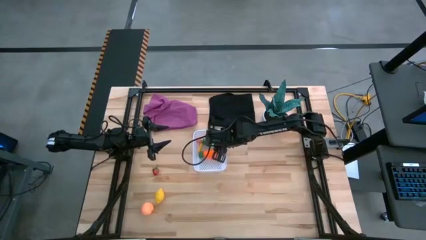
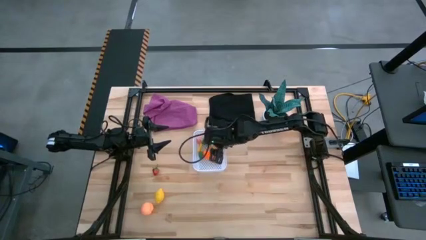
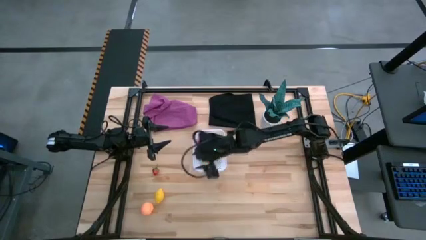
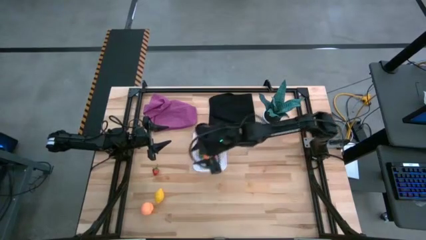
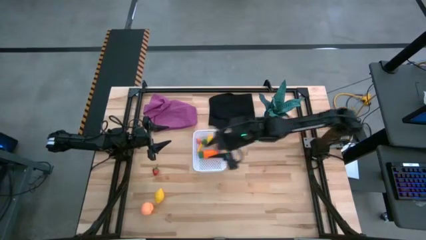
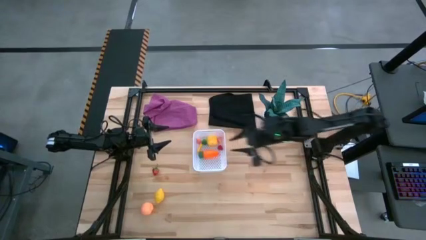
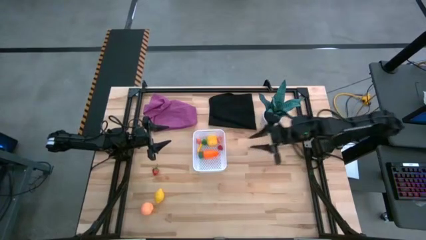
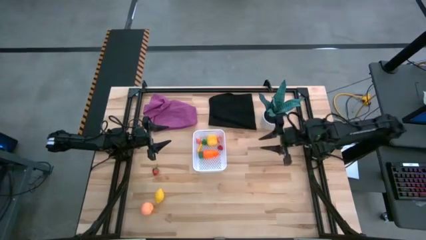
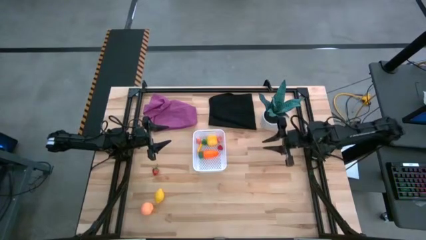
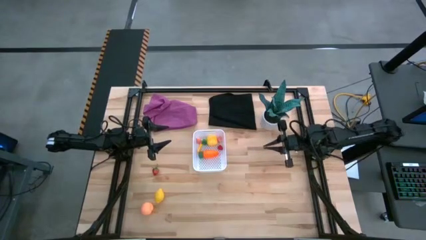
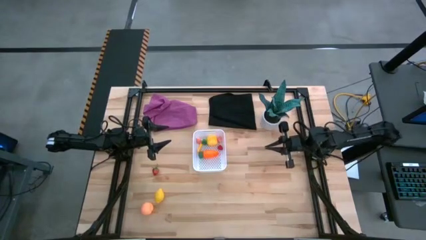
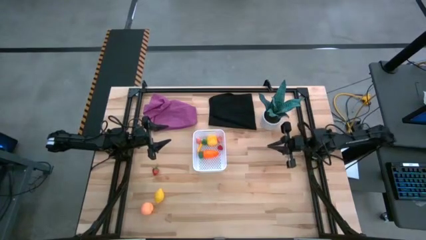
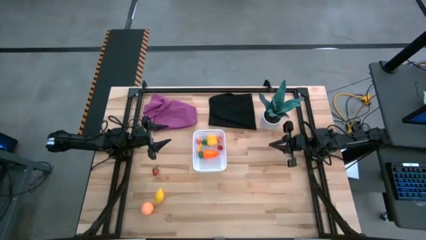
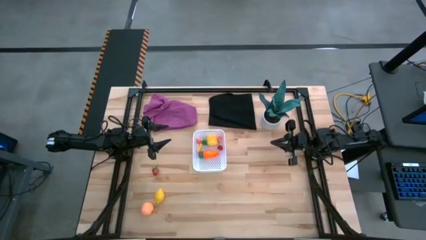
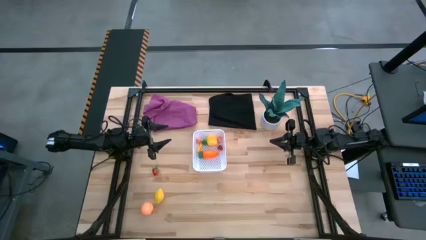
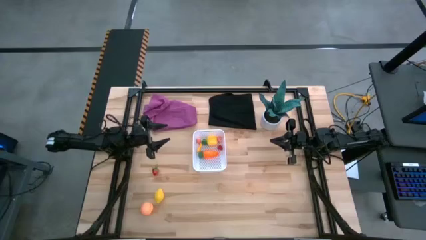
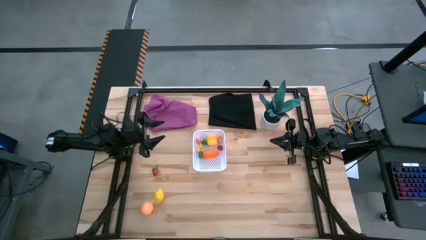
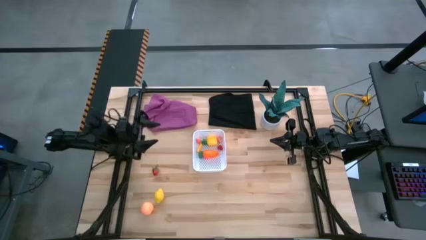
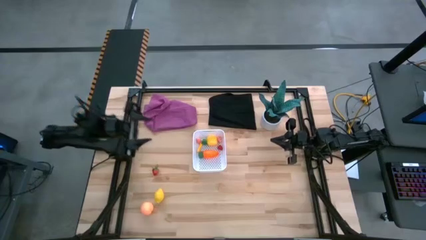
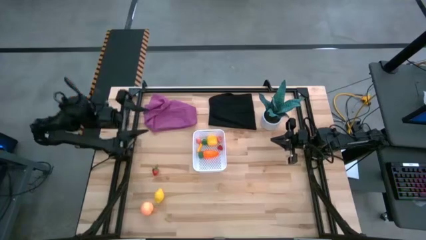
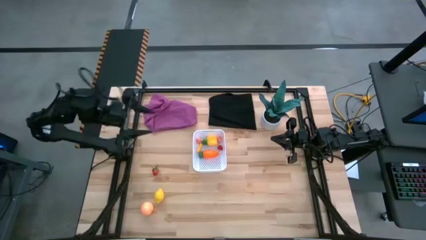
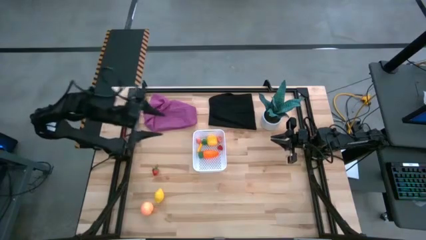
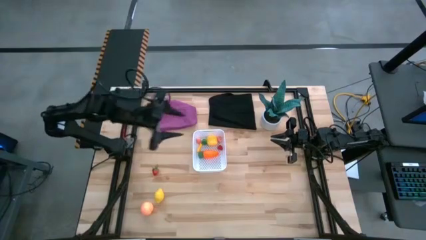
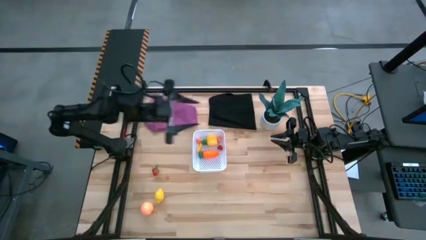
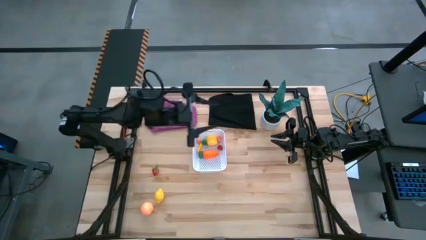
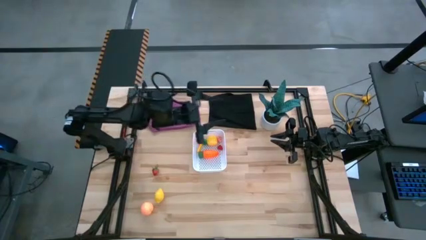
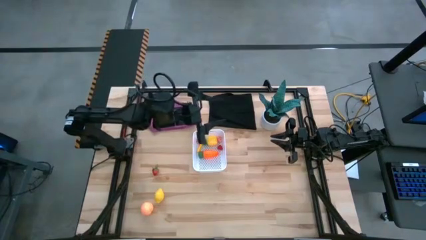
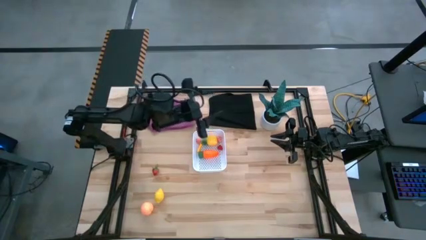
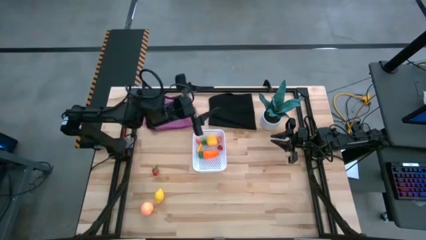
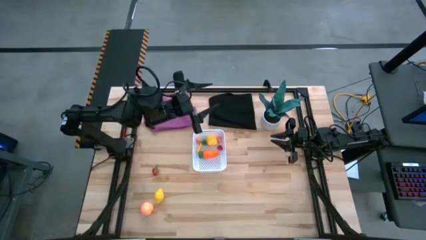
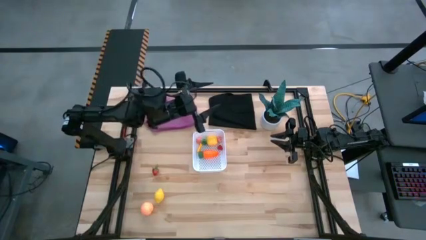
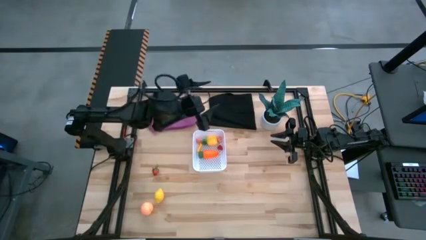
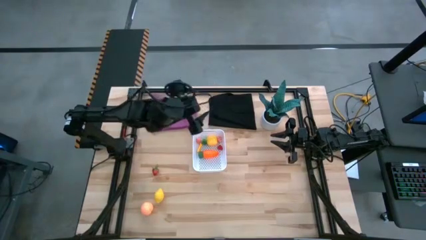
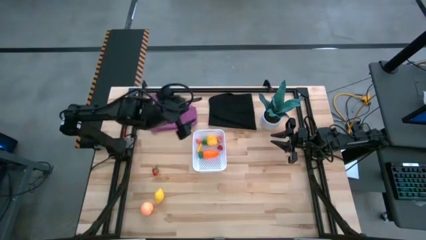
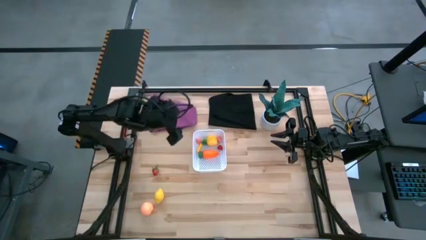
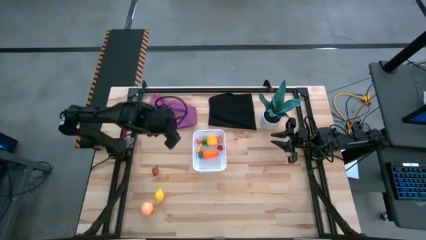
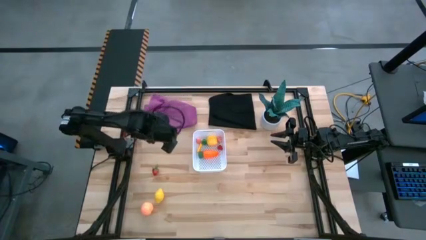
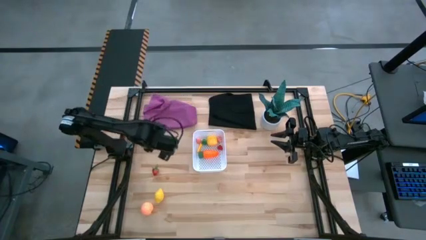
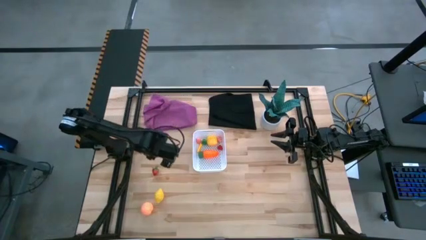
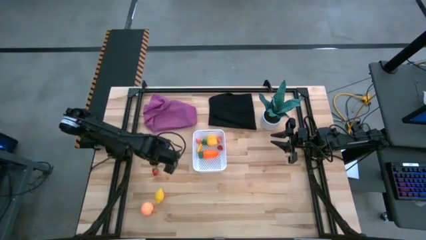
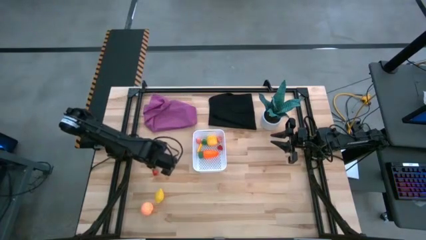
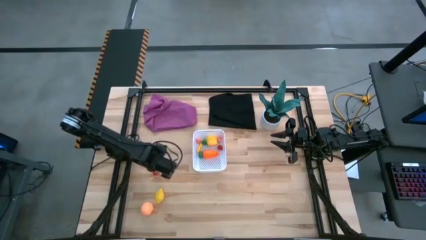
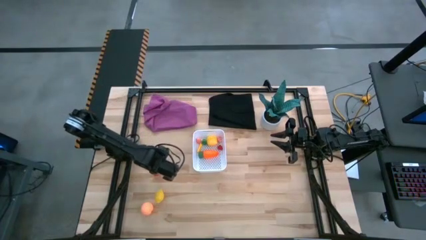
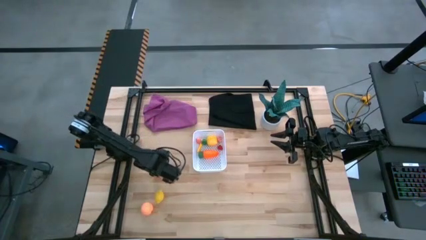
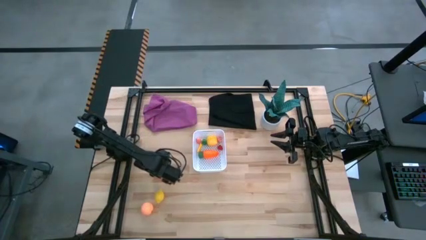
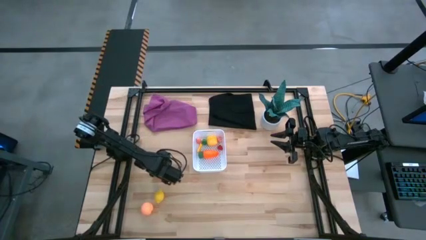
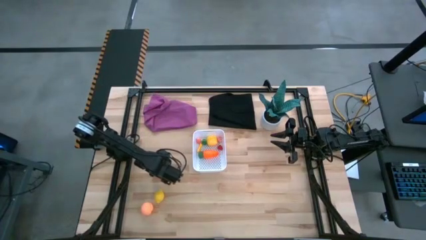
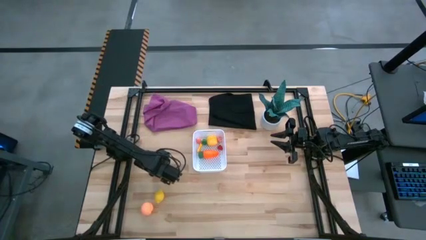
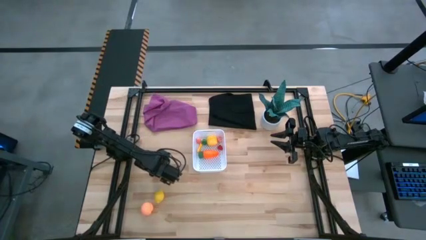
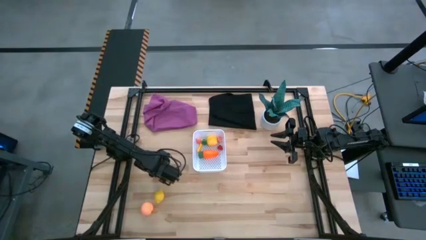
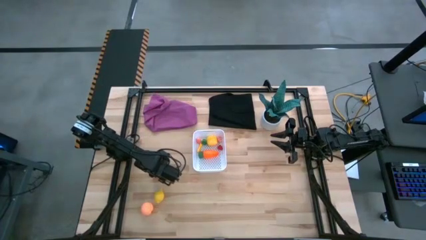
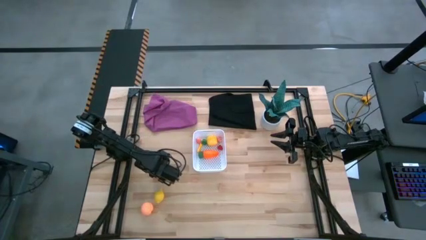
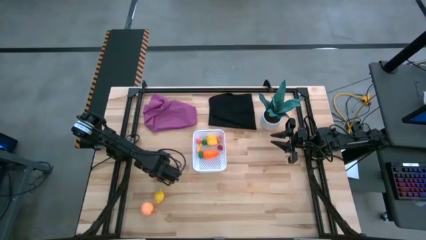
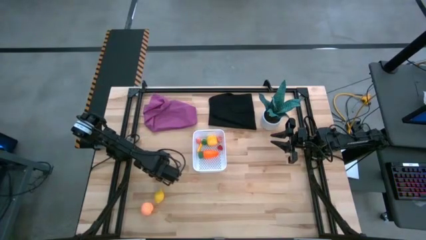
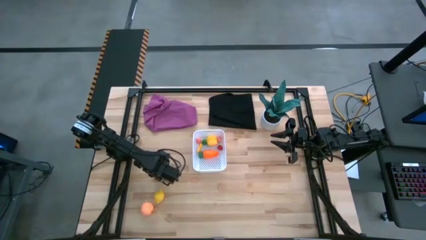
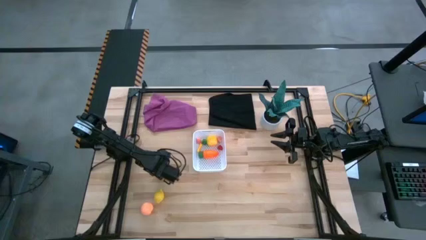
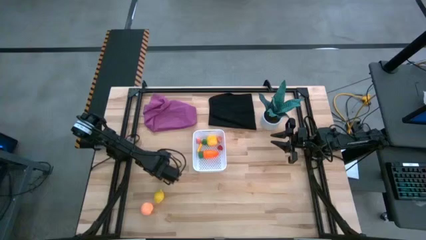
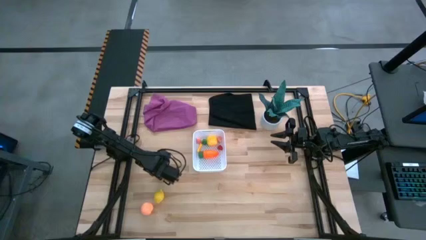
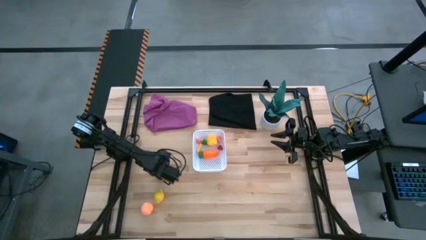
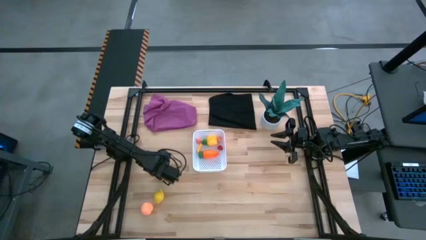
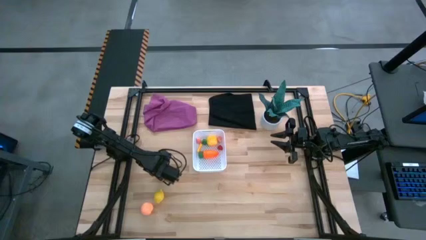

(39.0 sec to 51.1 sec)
Task: Pick and placing Produce into tupperware
Put the red strawberry into the white bin

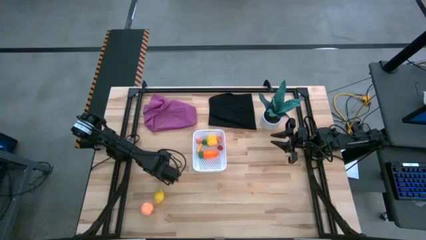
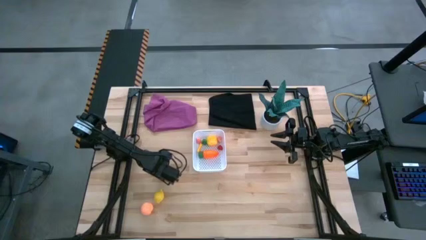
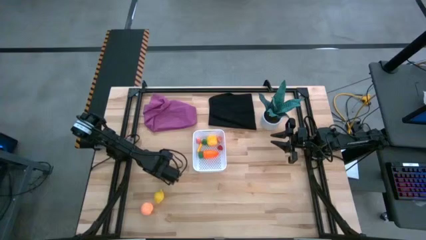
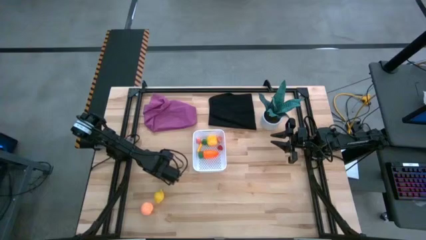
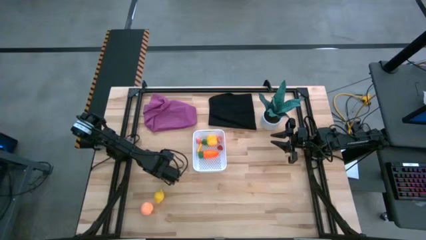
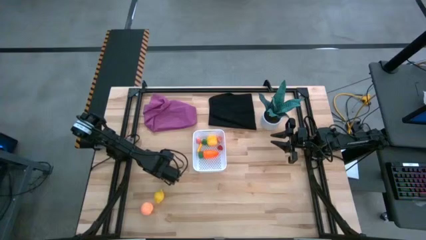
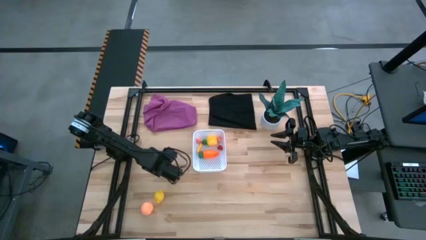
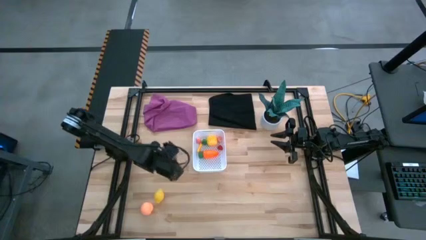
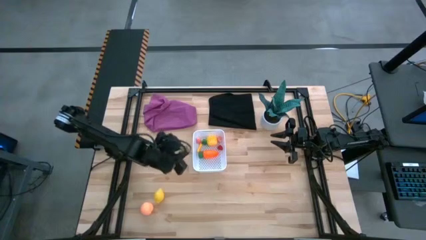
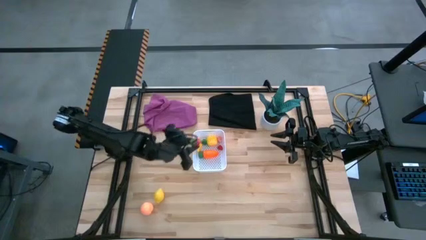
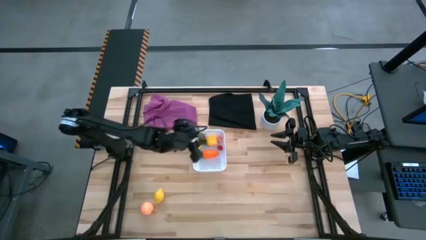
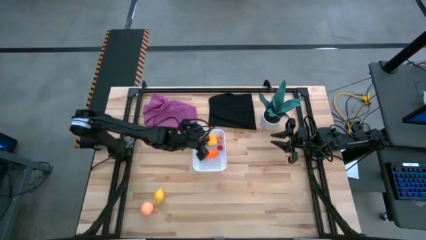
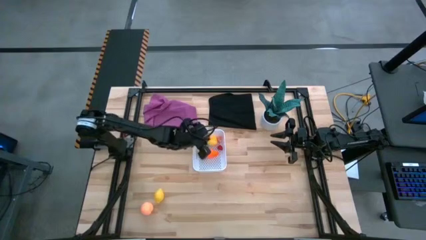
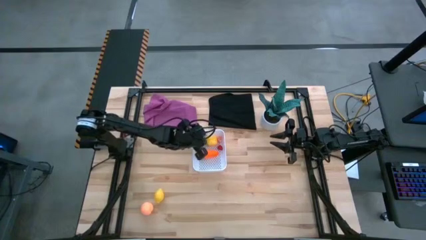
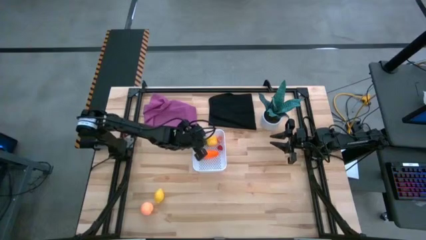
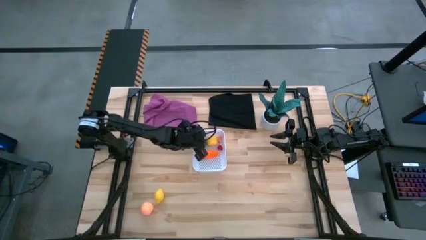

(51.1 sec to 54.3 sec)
Put the red strawberry into the white bin
